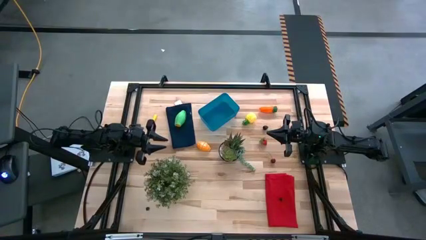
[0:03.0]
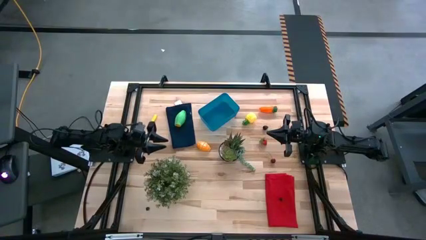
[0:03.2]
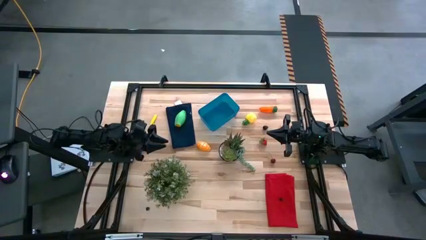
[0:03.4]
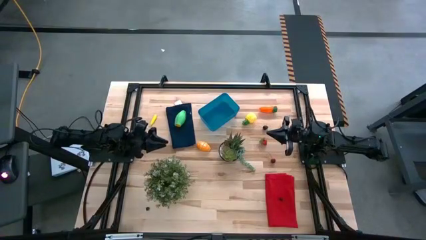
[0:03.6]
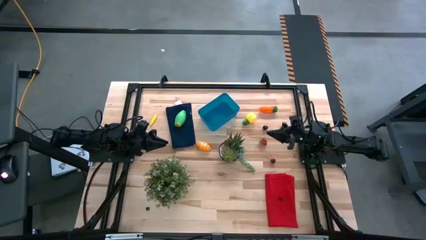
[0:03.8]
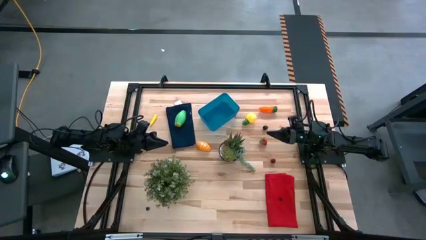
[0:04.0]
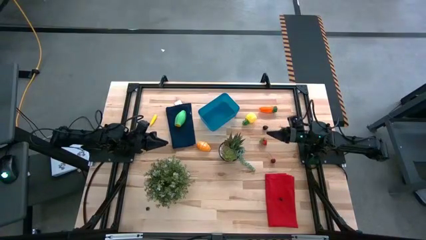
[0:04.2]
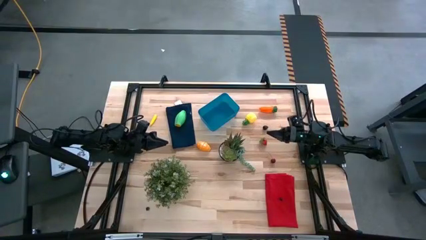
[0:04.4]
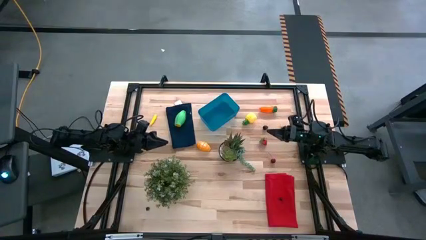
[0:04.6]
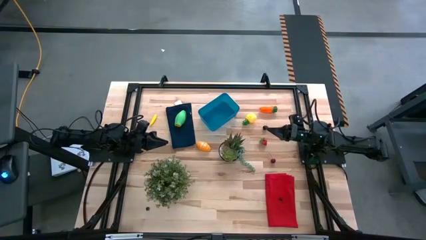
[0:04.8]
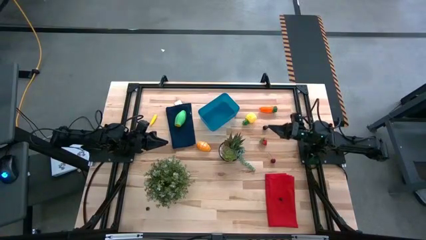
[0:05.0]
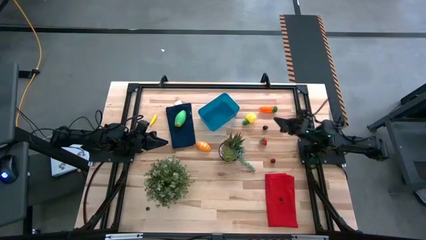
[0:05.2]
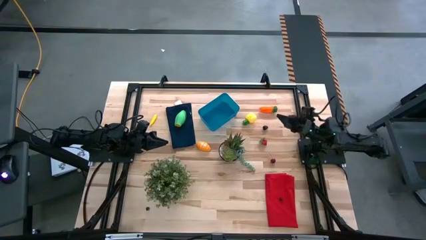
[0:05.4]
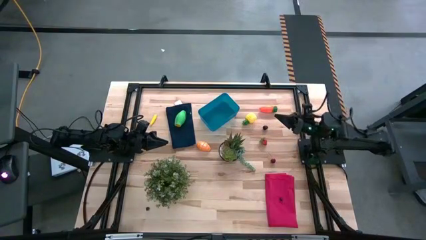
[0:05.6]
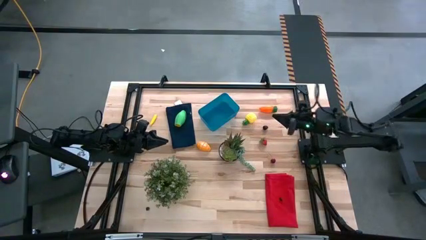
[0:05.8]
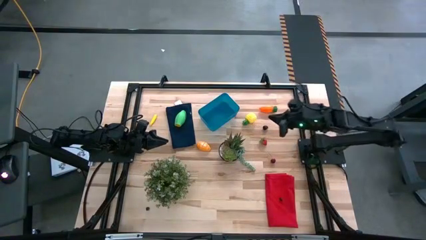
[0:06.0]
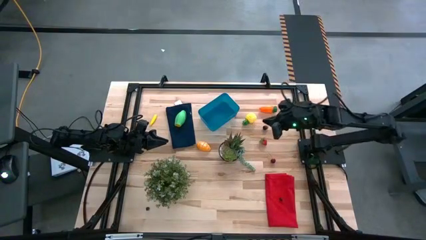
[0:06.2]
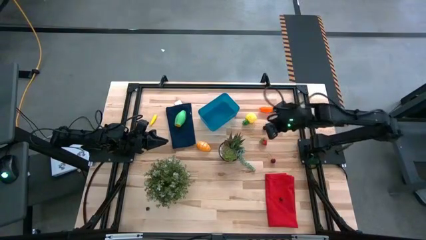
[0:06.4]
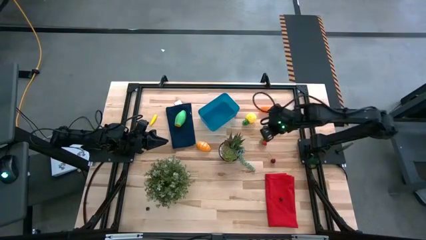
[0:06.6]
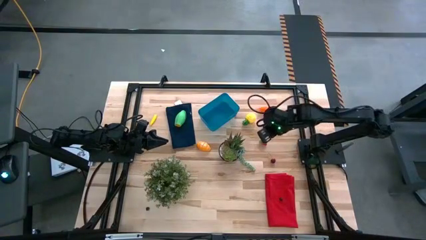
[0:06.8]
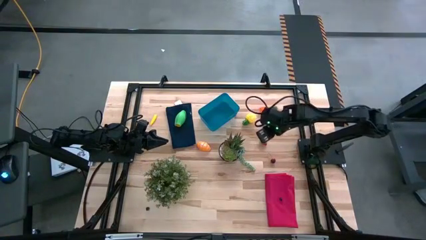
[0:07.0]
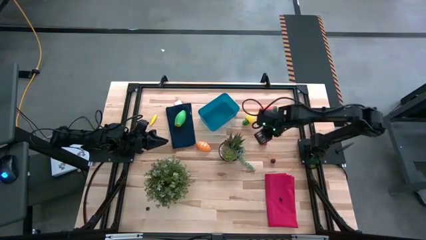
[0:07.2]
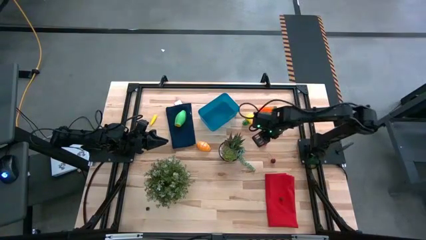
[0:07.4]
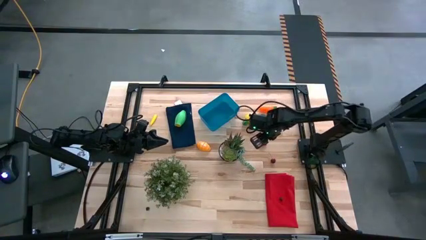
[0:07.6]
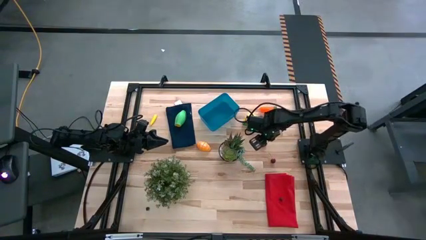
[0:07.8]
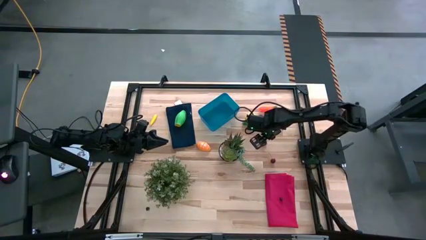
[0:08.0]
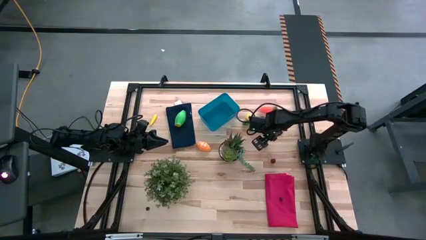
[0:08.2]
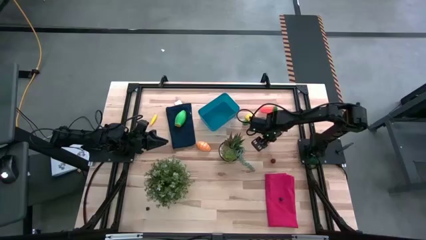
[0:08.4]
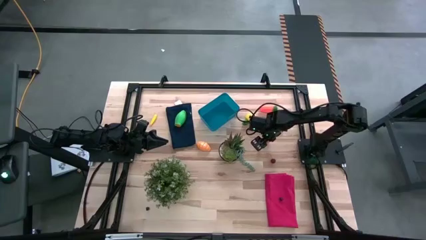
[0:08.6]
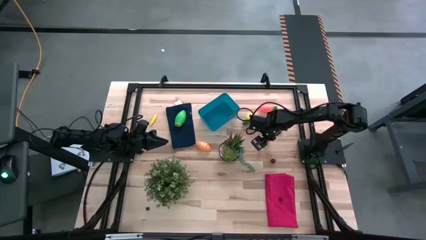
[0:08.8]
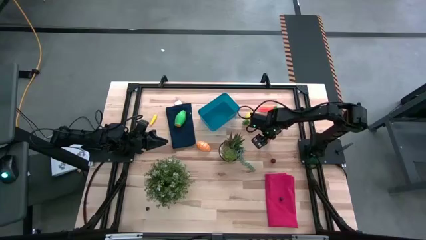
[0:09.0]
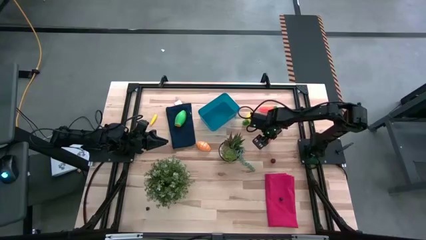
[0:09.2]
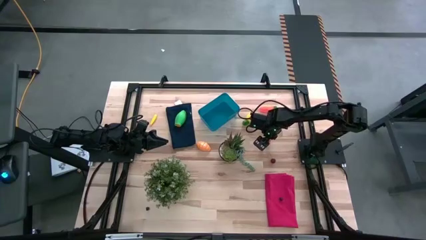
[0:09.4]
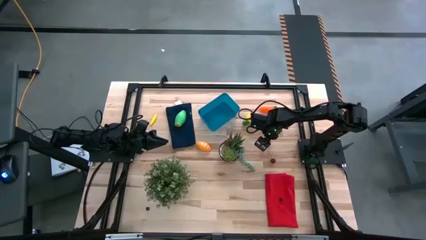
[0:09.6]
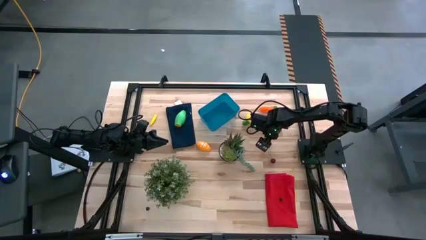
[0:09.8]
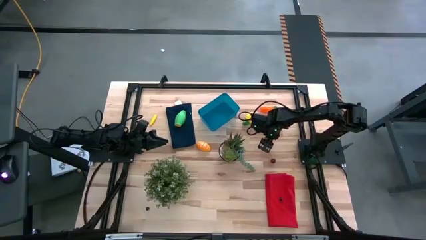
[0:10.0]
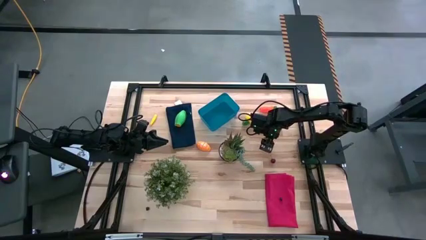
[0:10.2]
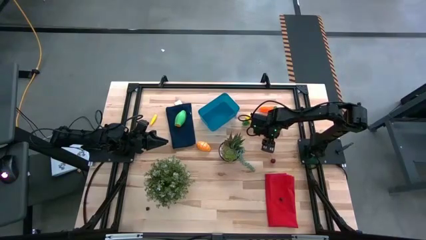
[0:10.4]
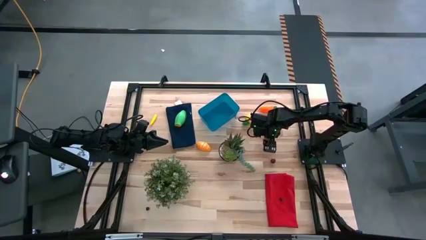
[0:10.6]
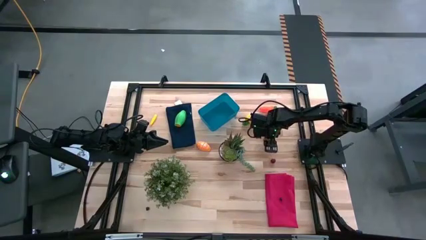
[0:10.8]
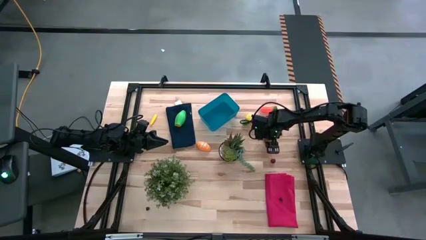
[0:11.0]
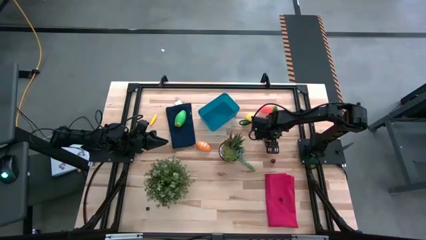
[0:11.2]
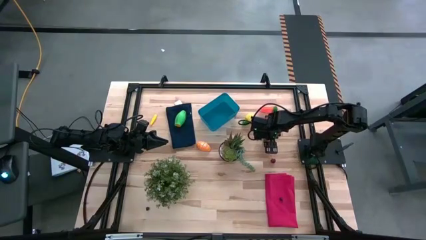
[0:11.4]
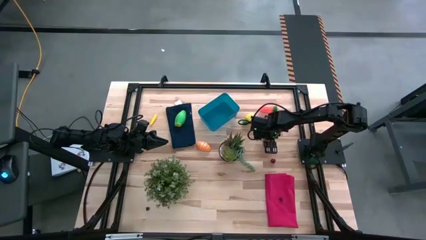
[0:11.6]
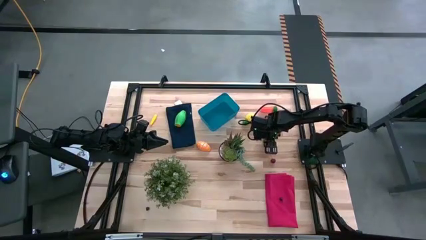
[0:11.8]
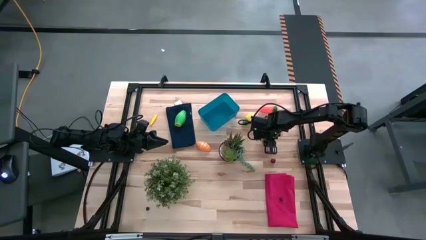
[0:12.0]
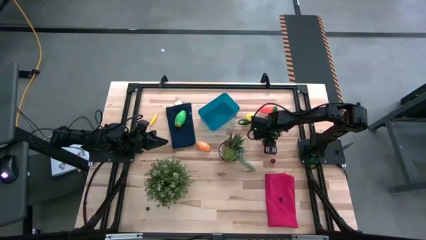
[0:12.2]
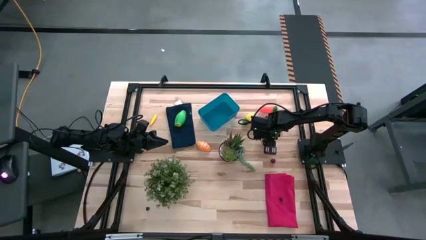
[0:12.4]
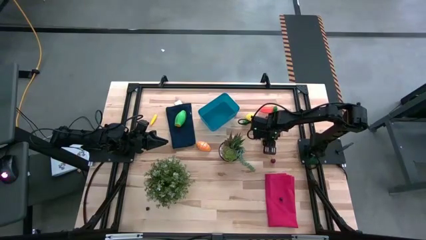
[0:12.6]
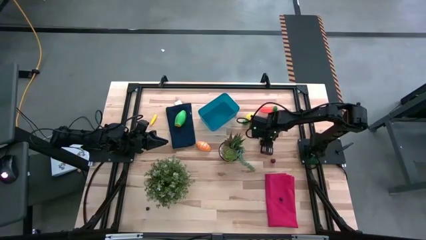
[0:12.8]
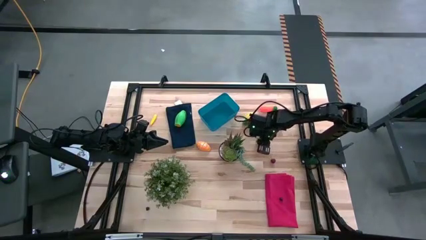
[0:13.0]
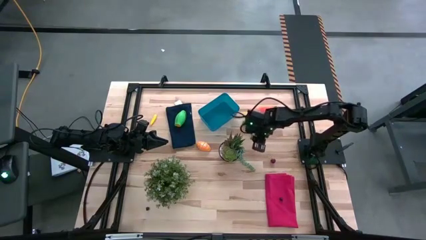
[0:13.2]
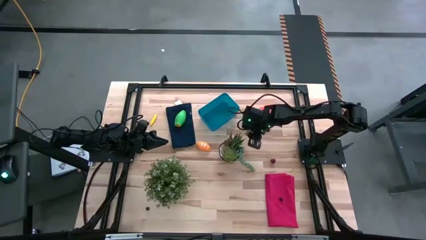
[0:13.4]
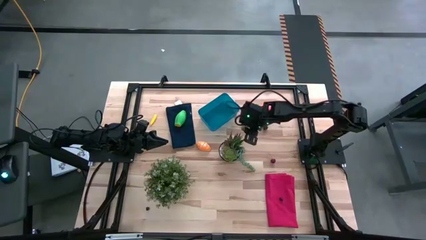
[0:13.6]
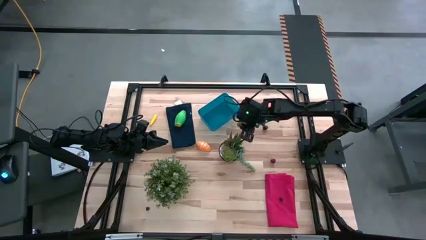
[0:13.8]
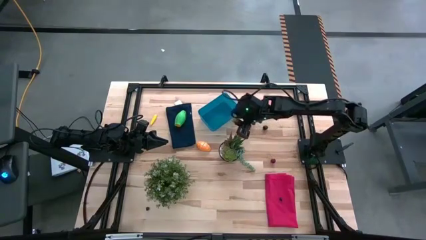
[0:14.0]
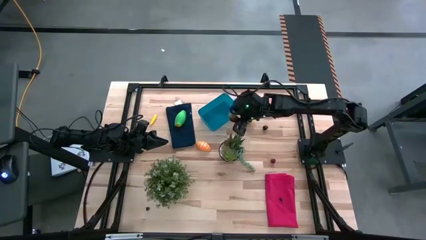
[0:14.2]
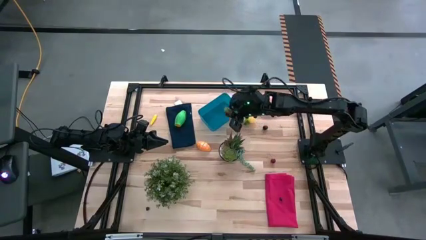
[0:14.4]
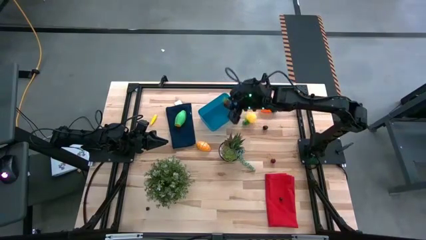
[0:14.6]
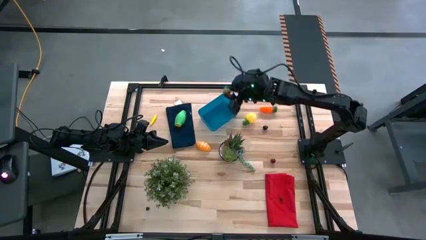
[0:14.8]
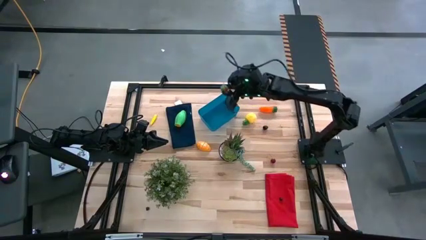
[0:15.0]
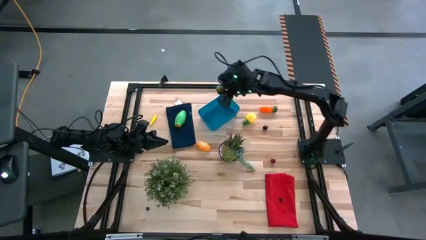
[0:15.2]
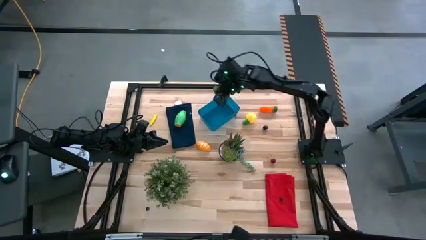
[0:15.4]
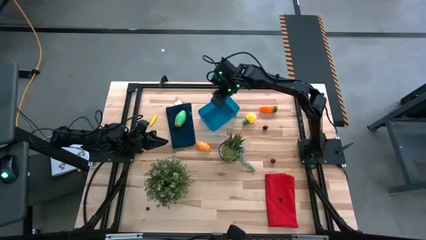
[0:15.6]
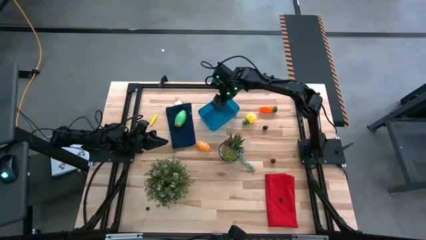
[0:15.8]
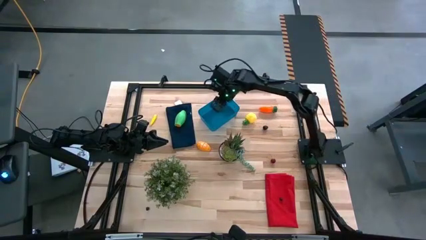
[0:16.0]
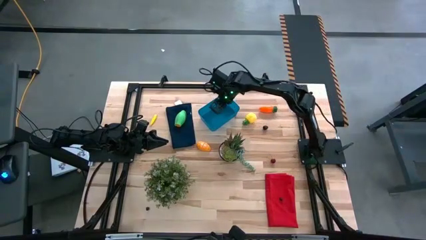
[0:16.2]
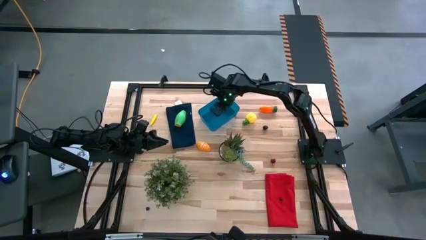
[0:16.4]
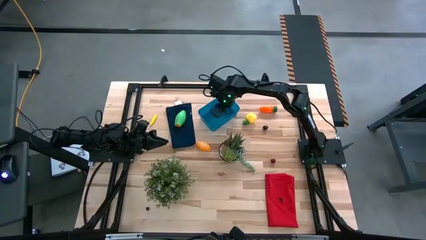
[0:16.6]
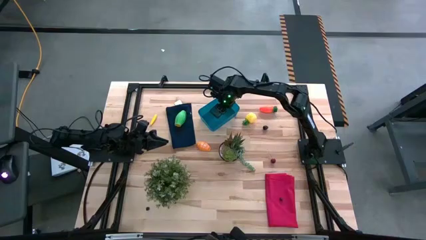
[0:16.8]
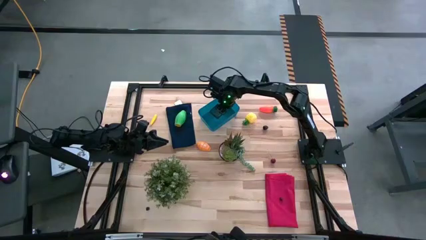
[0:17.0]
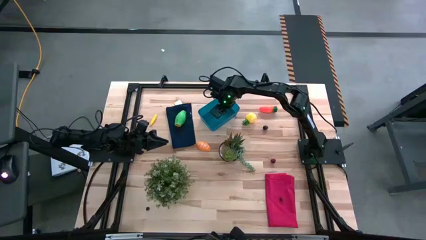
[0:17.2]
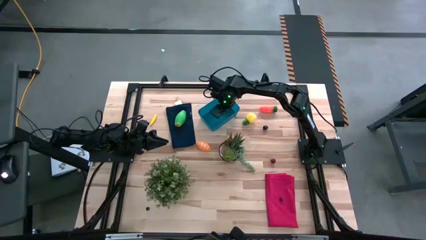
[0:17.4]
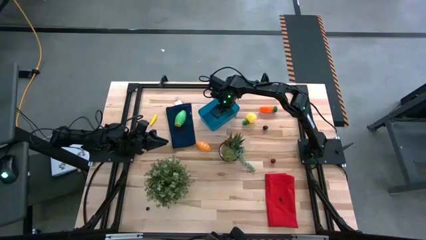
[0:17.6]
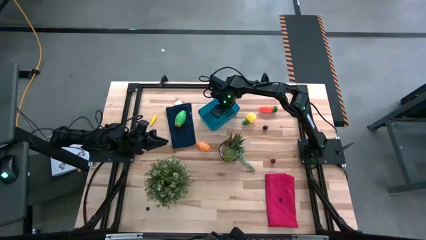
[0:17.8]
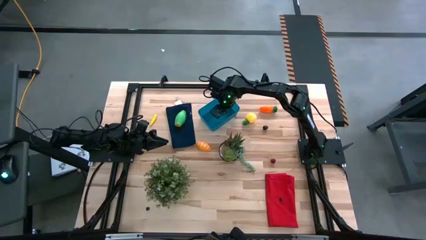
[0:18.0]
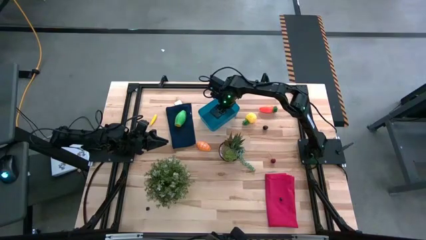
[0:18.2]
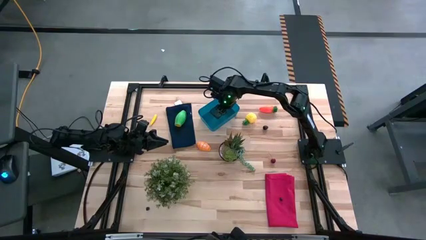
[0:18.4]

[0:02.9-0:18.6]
Task: Pick and placing Produce into tupperware
Put the red strawberry into the blue bin
